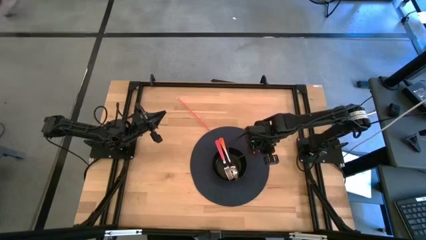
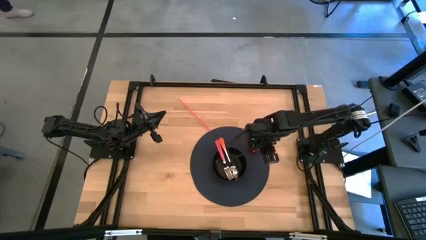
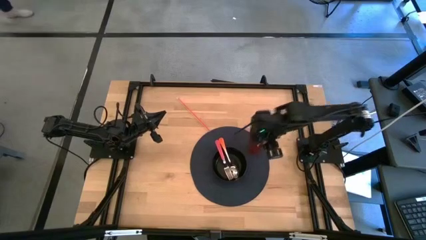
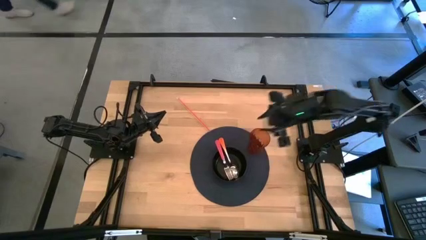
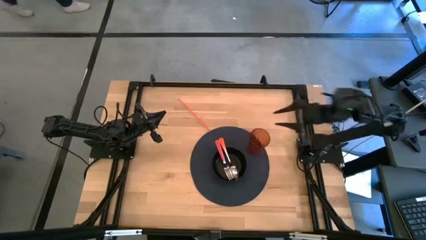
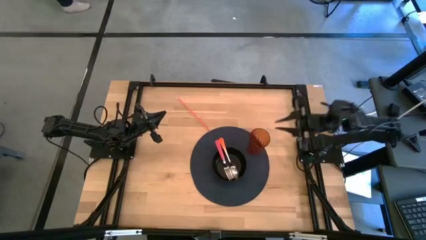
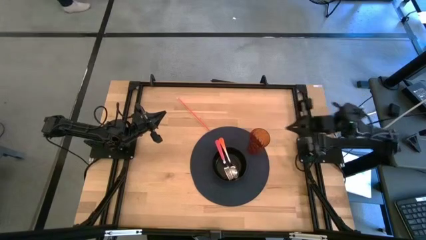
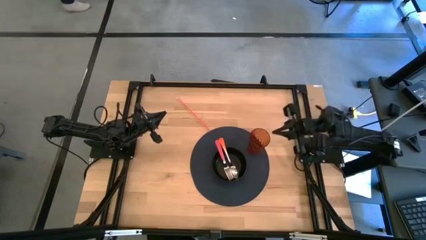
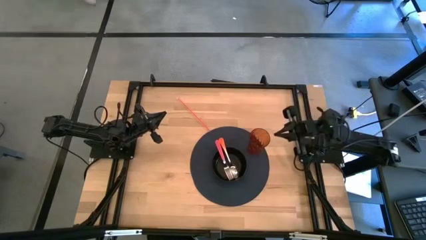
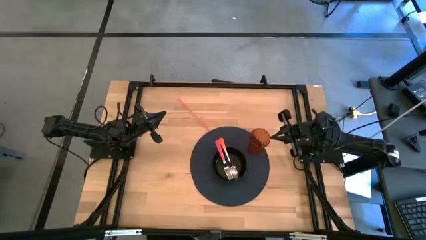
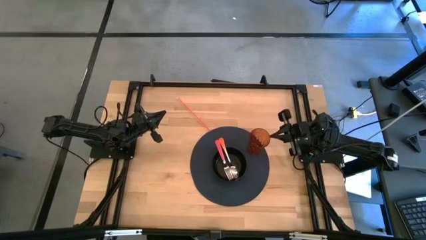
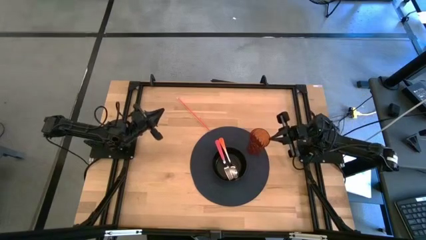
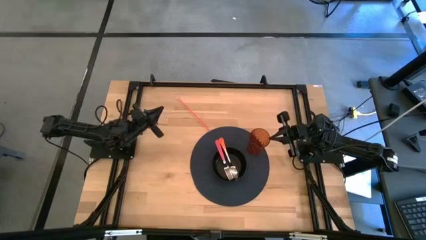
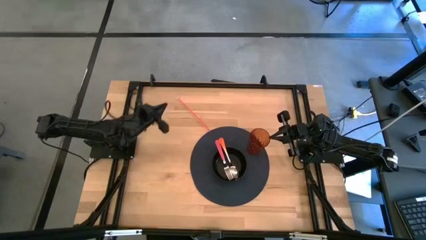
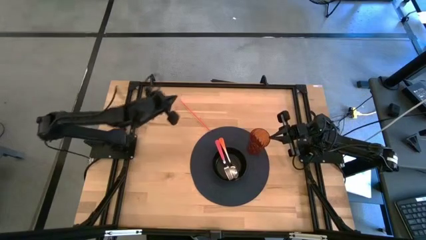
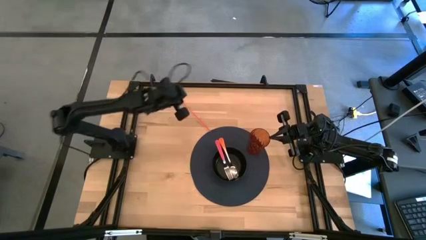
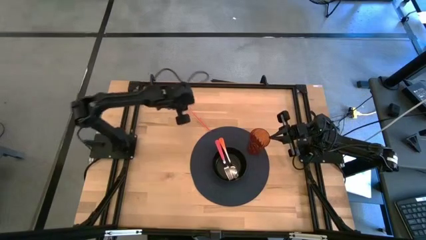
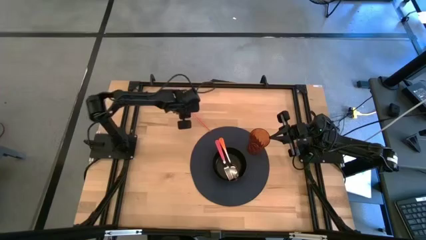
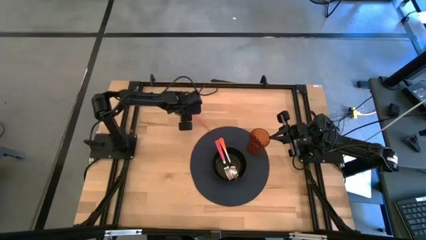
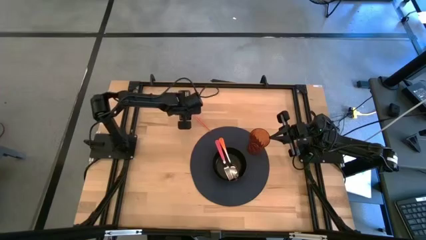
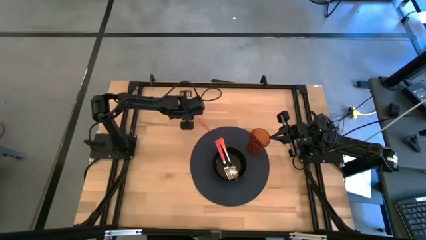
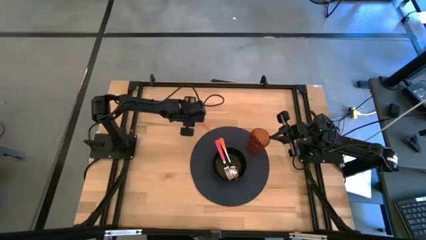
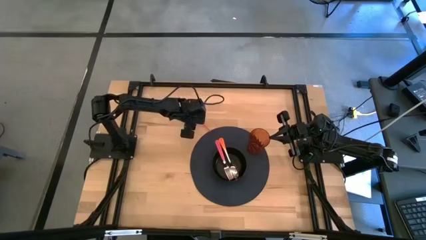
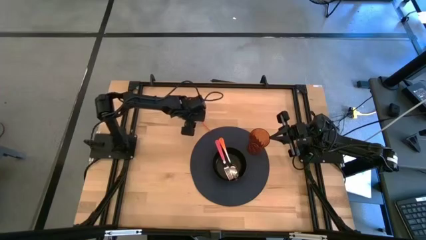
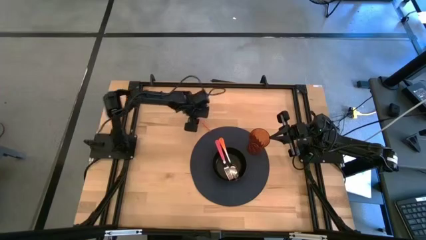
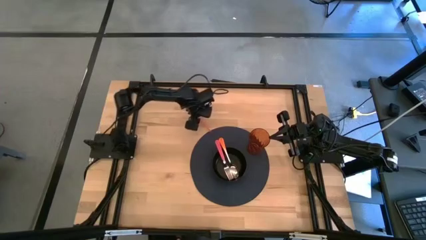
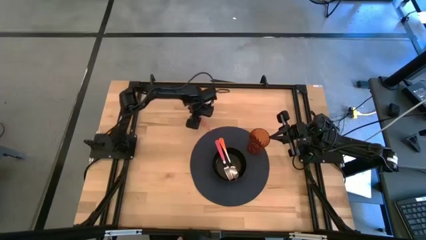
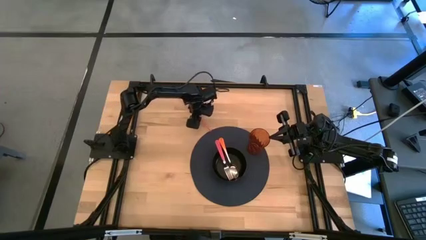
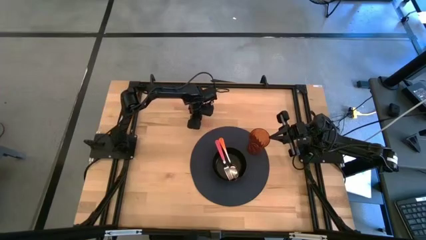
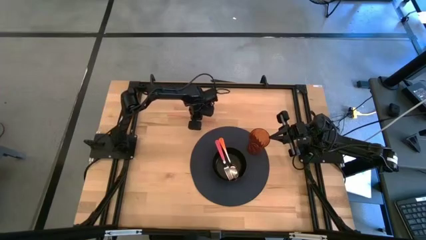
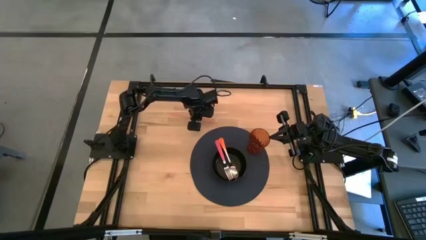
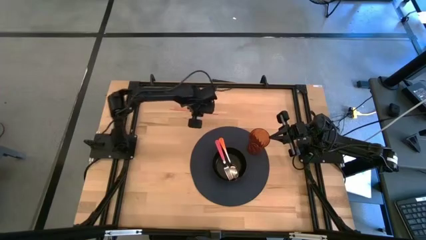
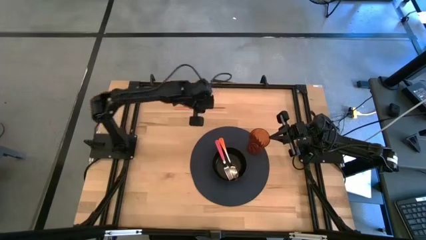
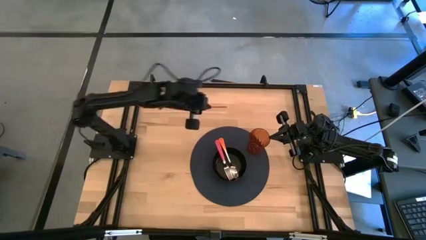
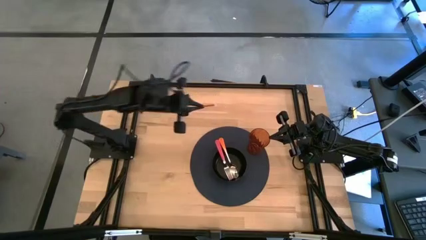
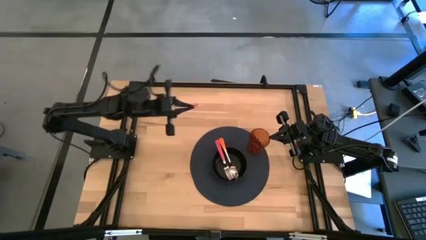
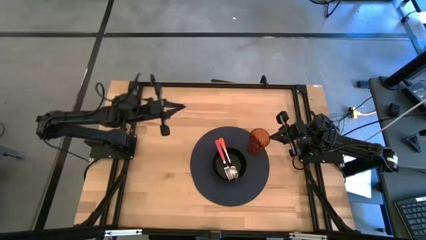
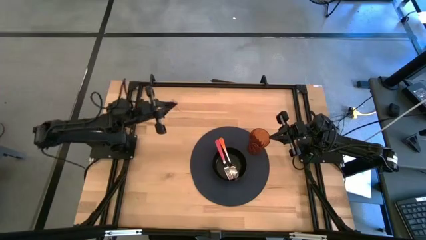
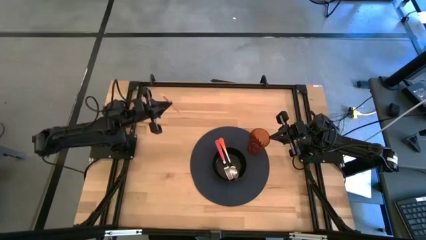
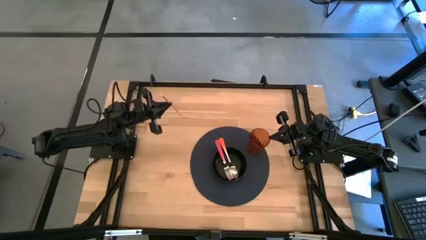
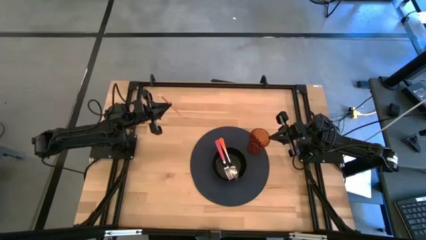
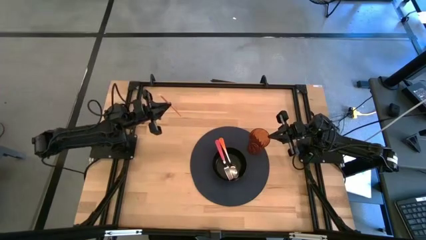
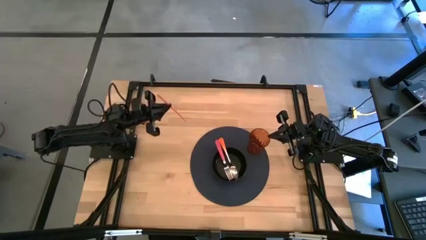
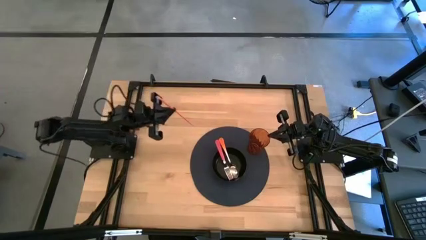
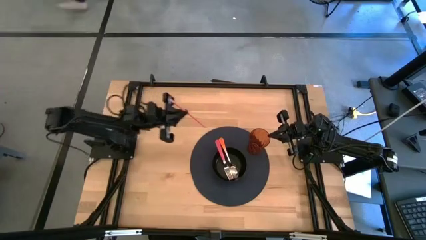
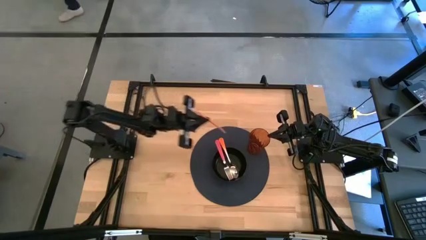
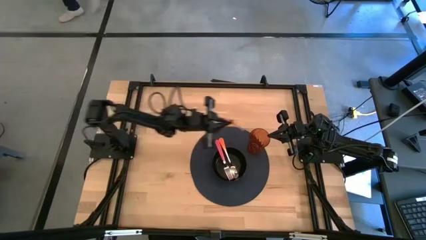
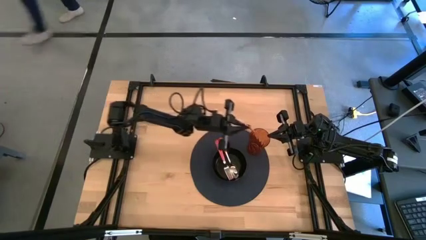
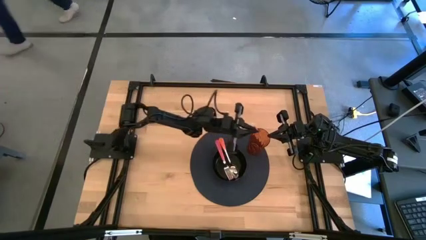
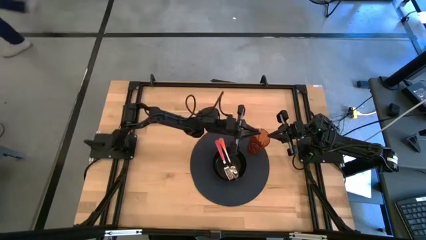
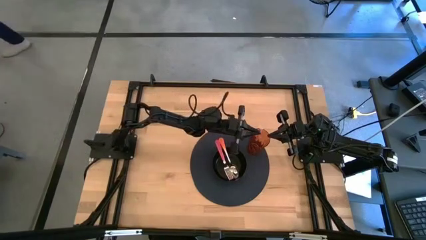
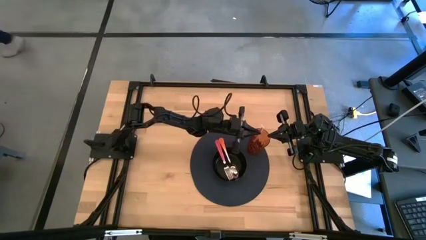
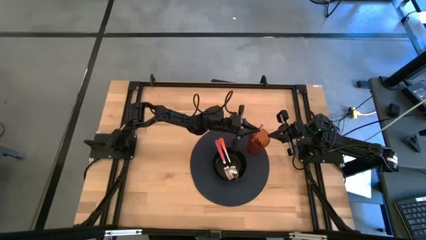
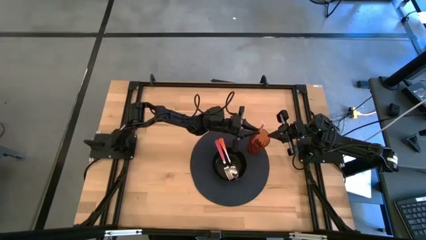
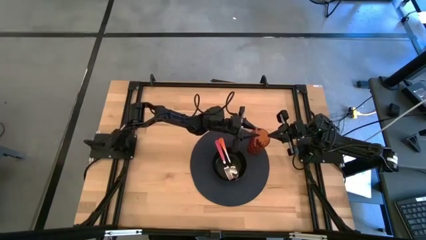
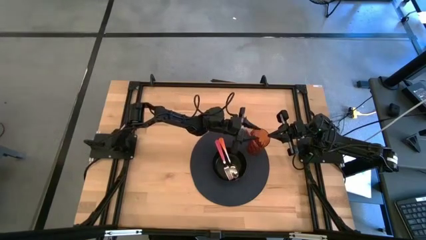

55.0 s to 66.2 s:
Task: Pick & Place Utensil
Put the orange straw into the orange cup on the black mat

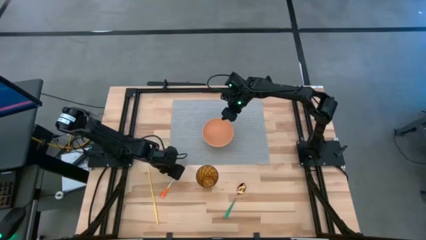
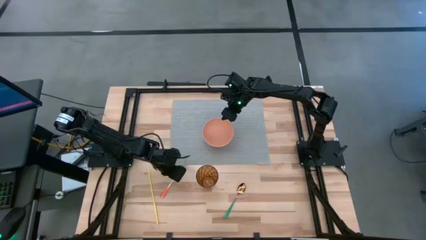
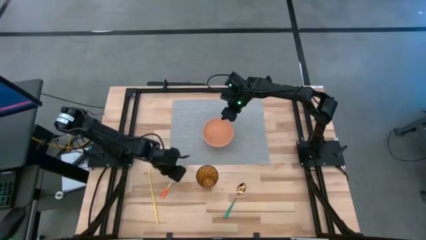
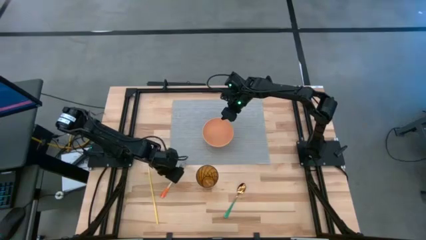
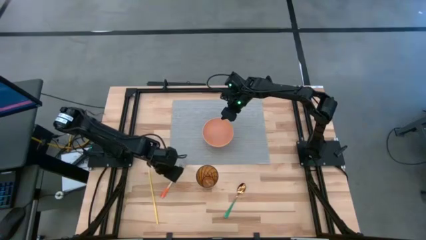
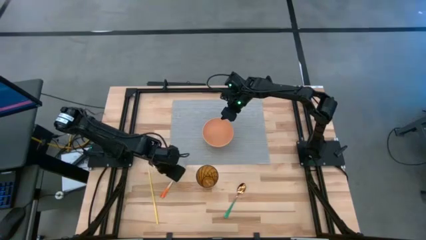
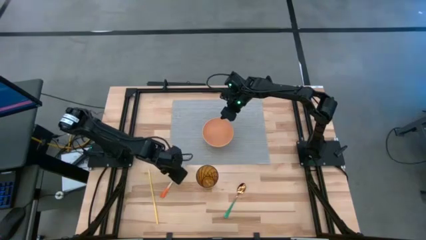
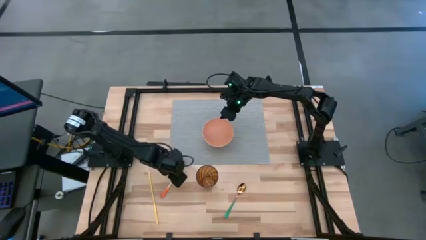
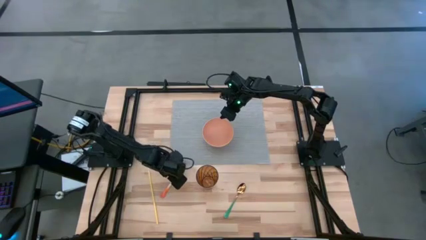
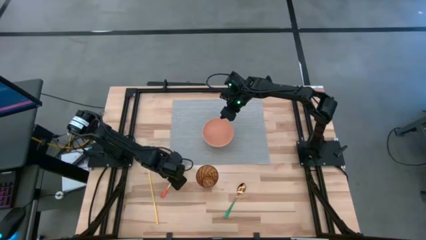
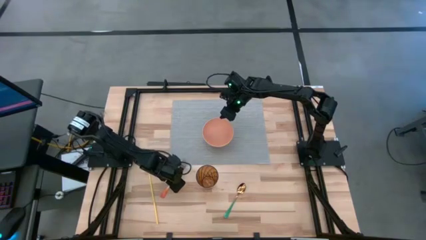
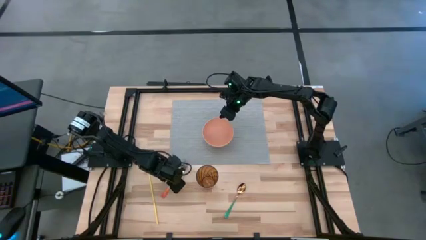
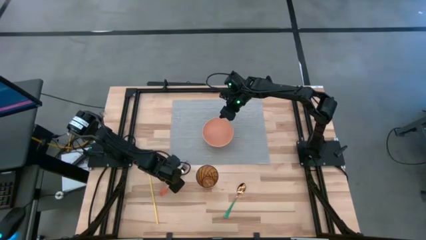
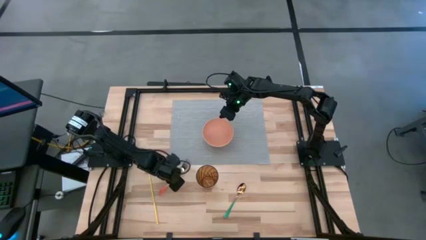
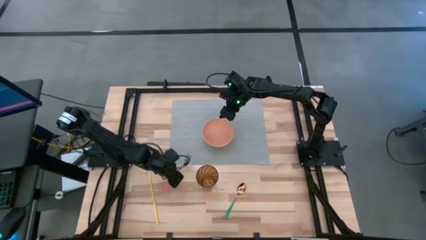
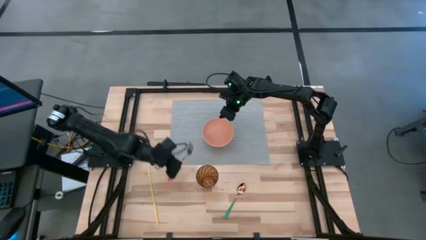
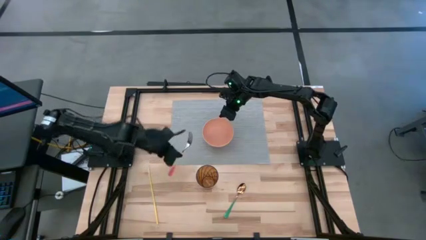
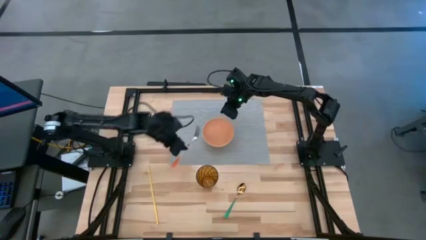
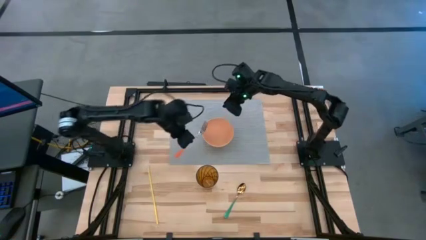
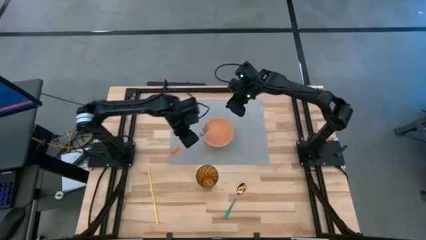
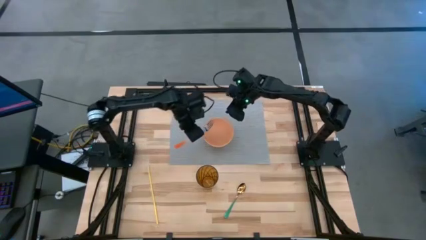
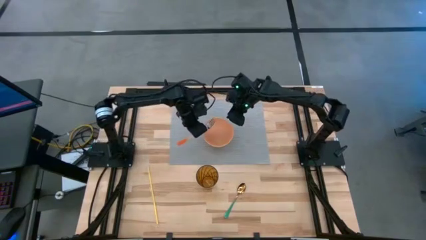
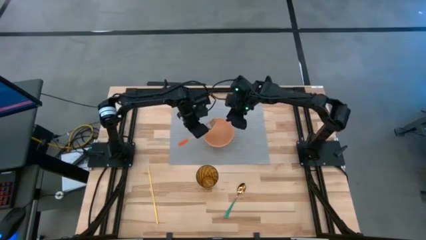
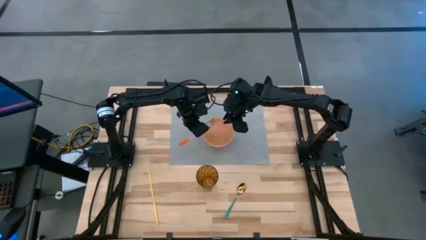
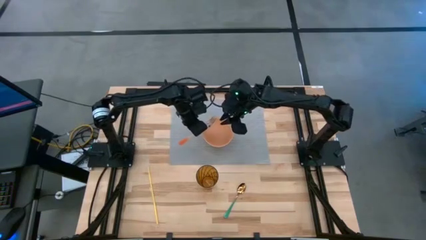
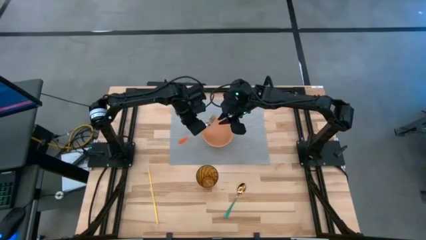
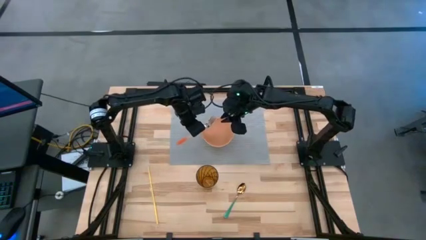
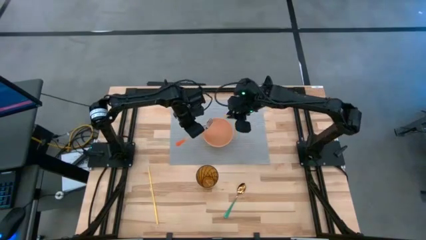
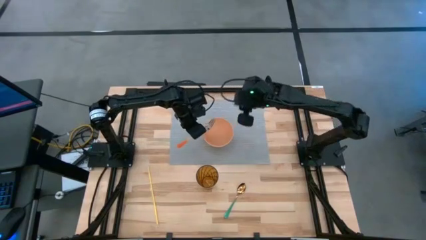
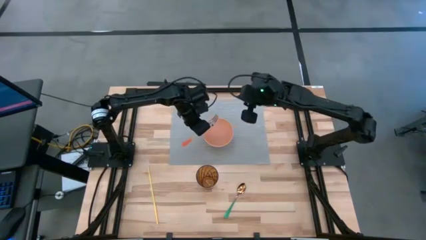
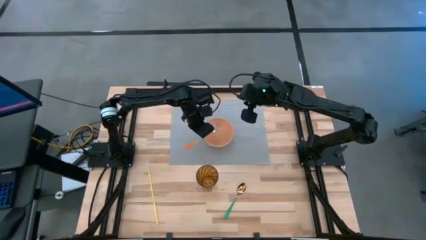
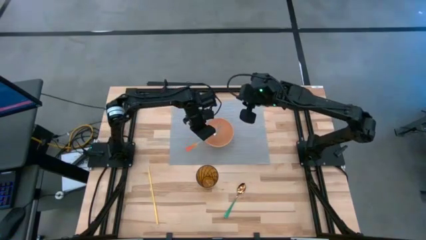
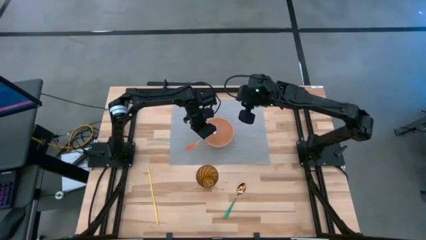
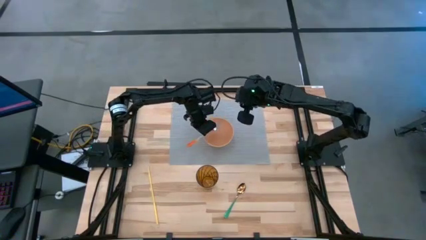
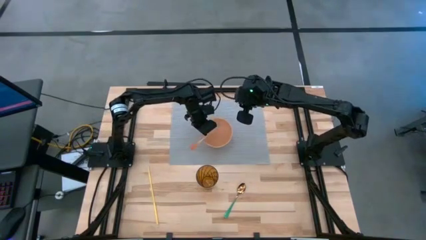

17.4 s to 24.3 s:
Task: Pick & Place Utensil
Put the orange fork into the light orange bowl
